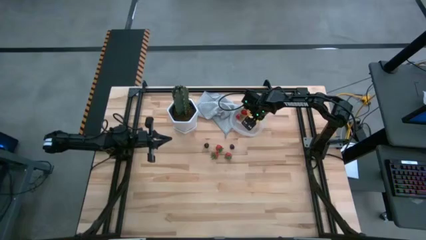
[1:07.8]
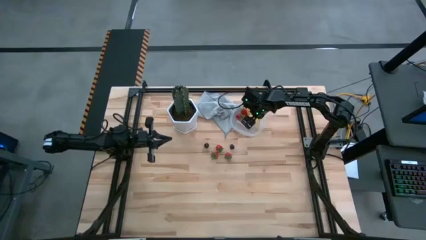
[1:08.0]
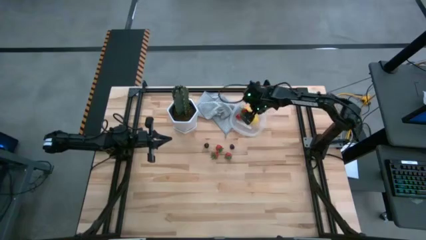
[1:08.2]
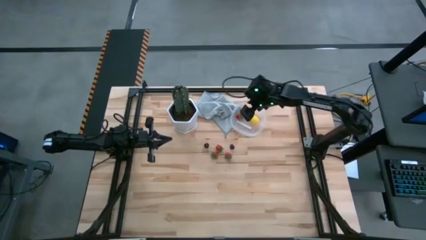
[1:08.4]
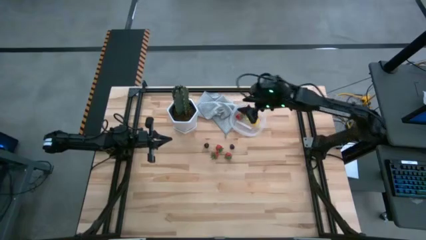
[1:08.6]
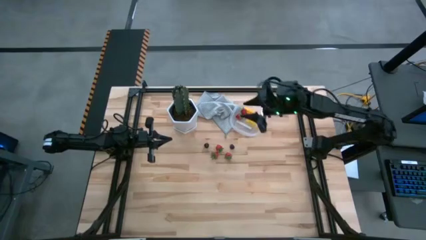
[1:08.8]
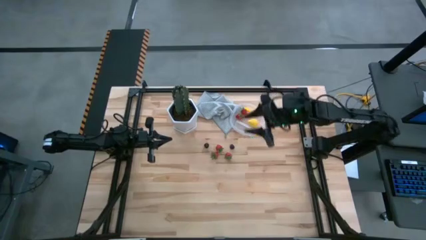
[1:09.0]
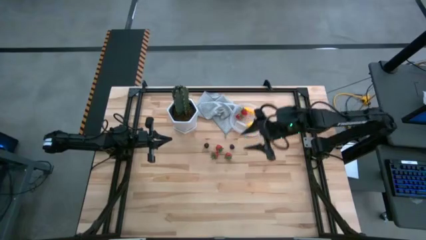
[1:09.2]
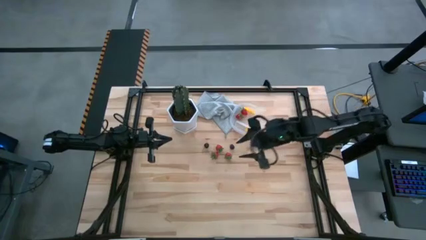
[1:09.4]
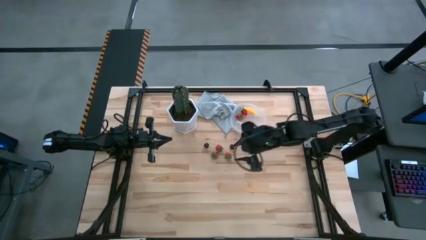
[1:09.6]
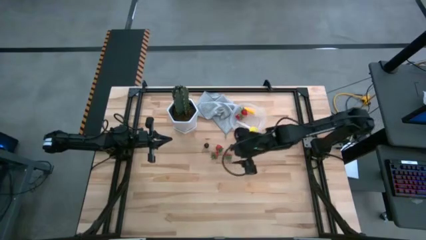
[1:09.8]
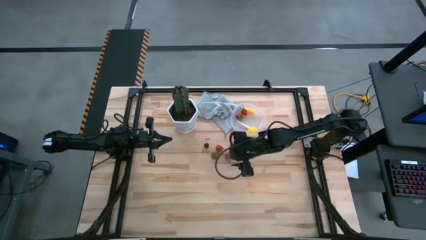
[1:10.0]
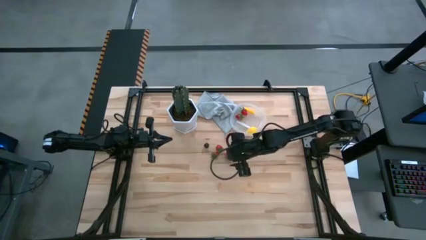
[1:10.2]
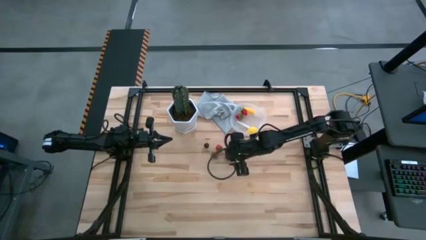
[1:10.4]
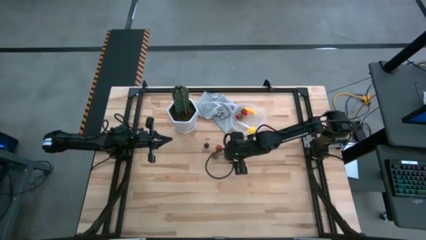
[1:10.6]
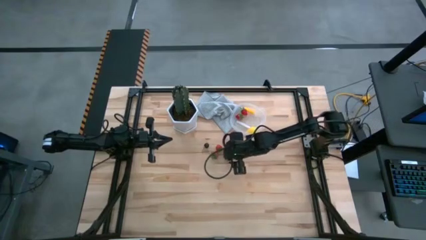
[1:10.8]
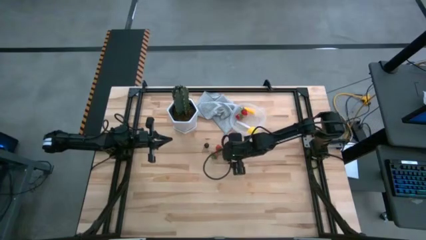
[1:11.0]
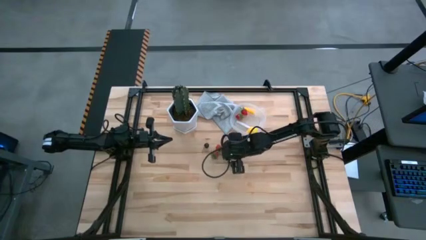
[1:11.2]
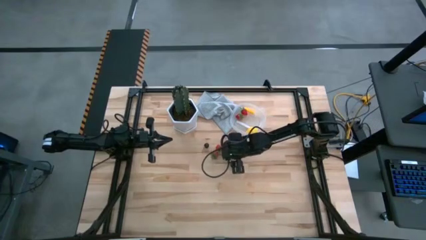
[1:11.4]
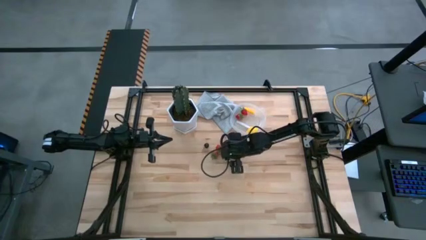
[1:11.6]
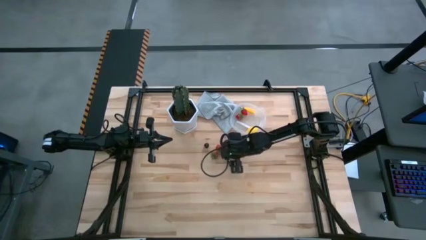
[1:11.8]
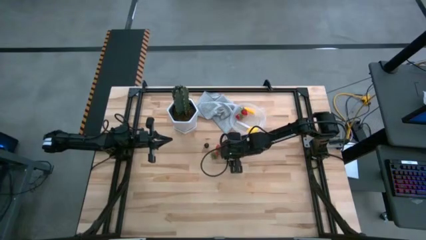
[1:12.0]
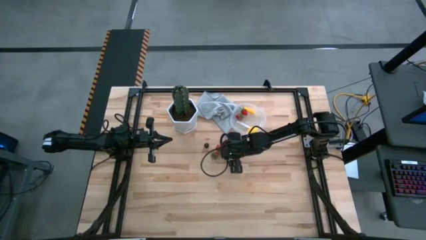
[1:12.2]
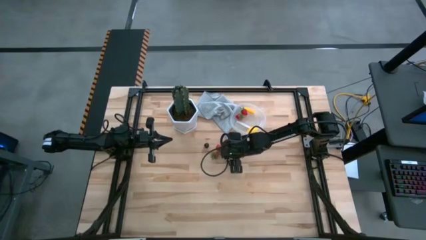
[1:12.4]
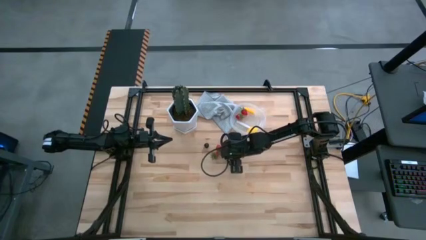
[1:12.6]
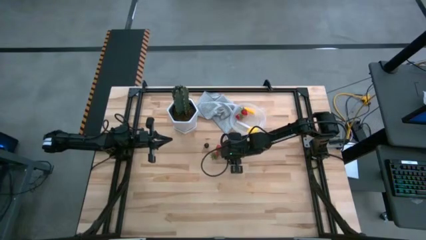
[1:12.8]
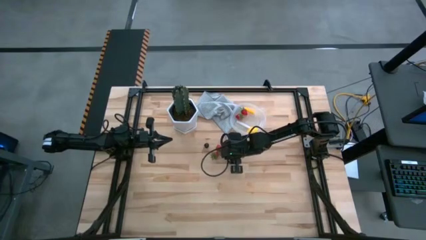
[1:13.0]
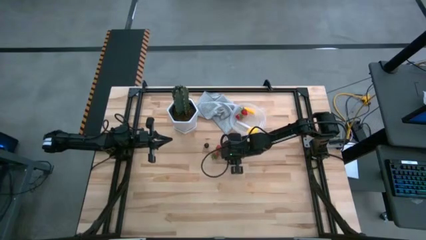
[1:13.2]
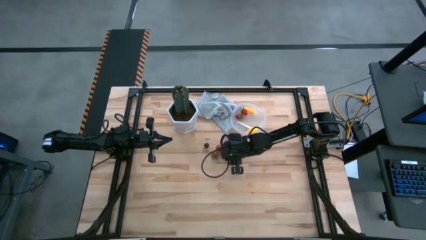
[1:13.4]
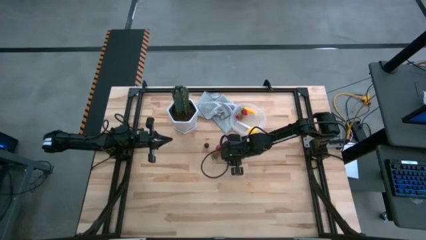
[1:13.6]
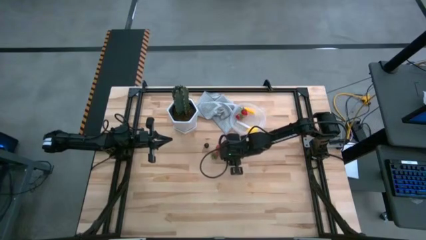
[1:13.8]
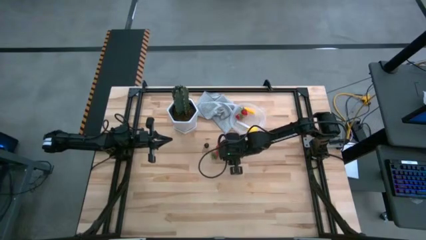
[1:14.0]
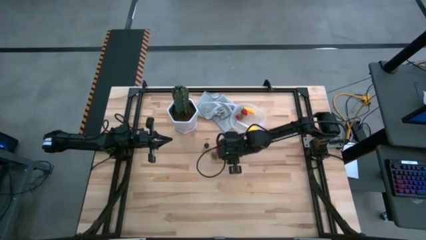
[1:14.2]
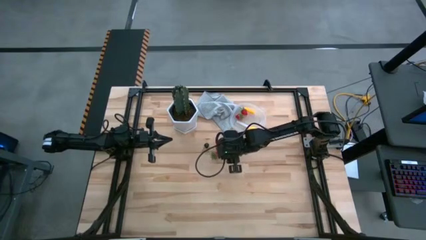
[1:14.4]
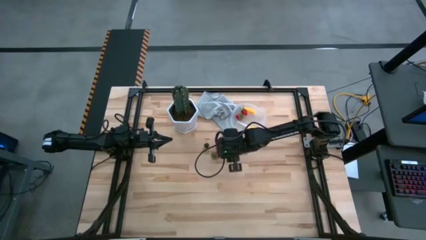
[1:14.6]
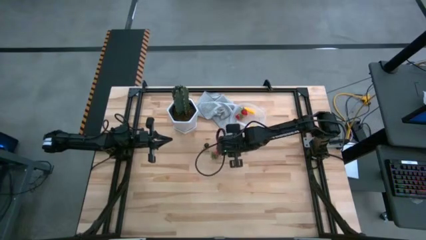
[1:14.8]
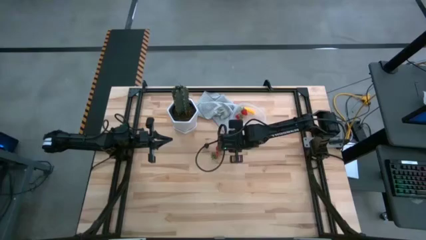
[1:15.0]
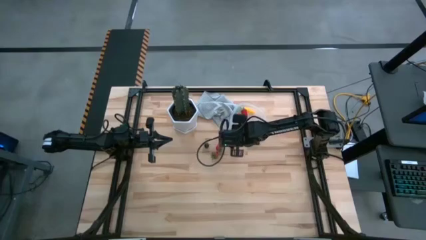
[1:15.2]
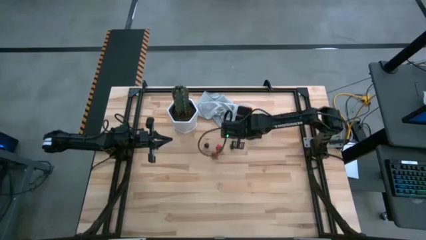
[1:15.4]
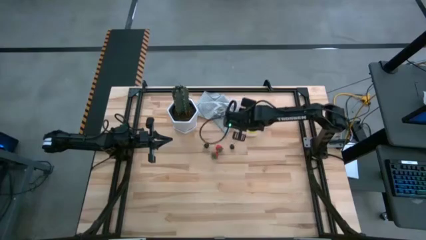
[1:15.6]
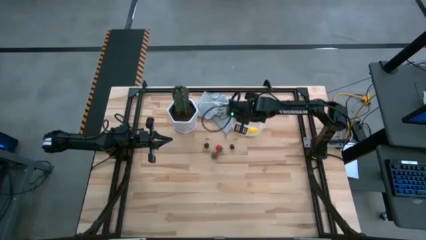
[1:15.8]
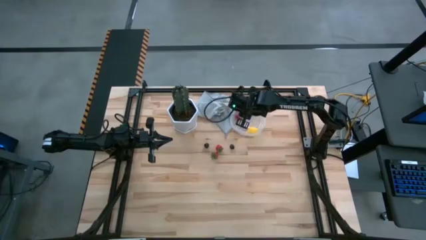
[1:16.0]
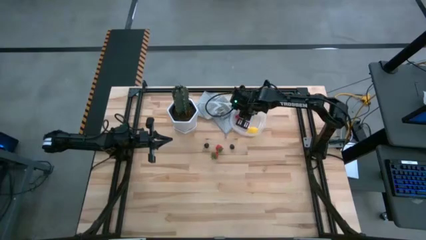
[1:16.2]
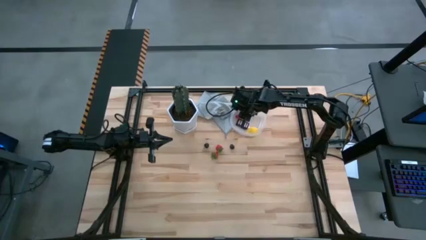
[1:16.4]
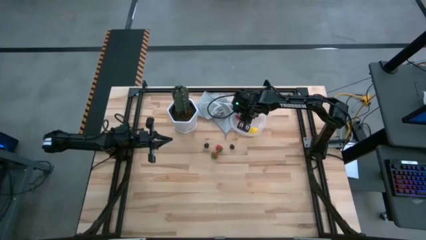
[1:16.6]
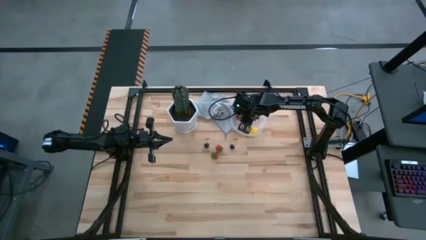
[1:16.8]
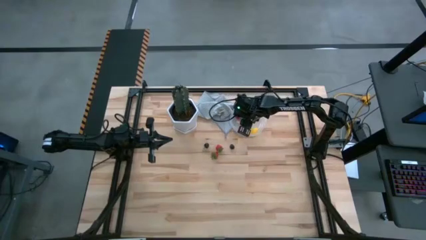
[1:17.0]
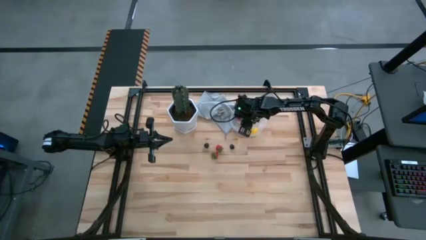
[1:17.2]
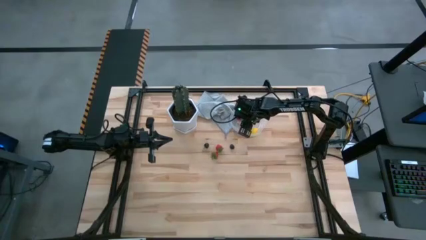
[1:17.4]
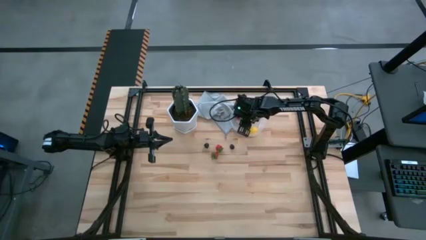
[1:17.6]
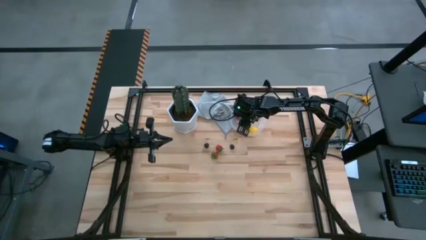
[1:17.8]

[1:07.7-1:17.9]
Task: Pick and placing Produce into tupperware
Put the right strawberry into the transparent bin

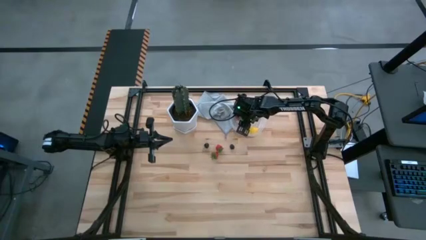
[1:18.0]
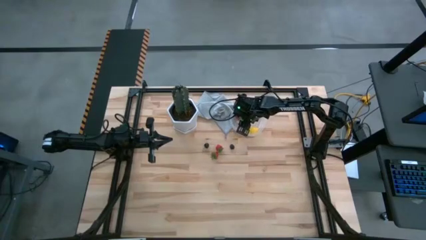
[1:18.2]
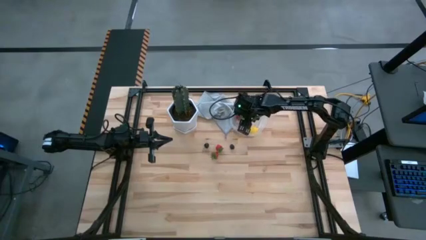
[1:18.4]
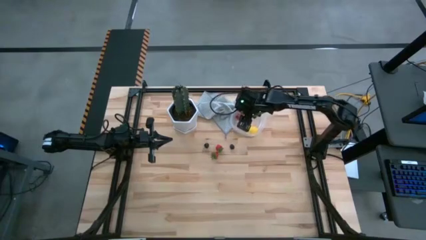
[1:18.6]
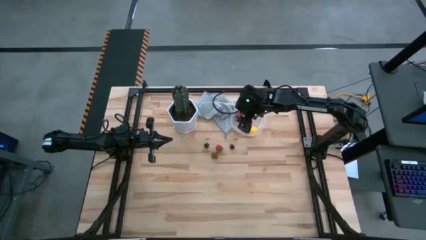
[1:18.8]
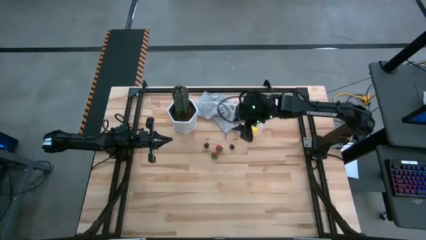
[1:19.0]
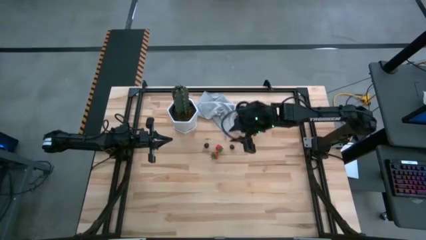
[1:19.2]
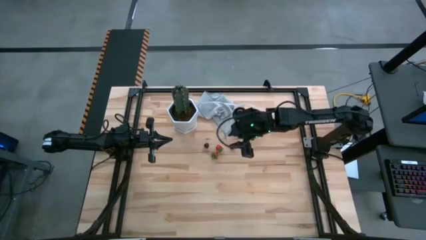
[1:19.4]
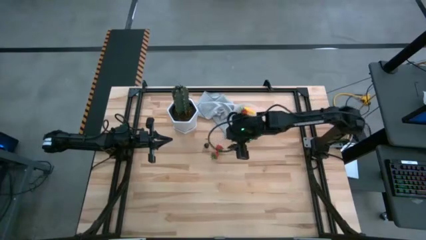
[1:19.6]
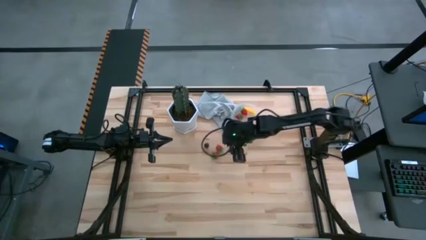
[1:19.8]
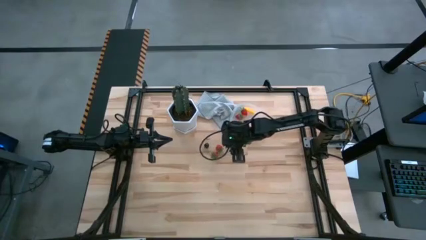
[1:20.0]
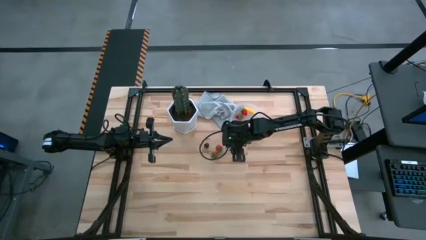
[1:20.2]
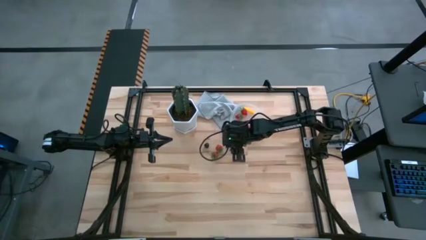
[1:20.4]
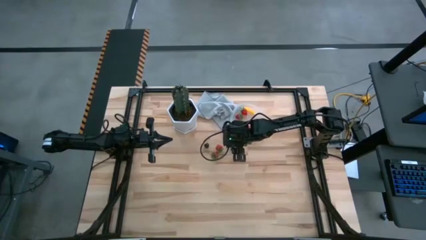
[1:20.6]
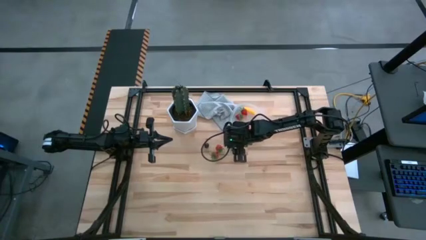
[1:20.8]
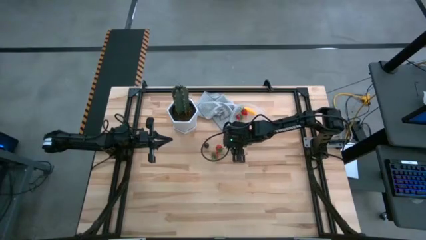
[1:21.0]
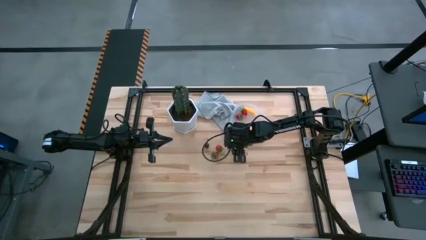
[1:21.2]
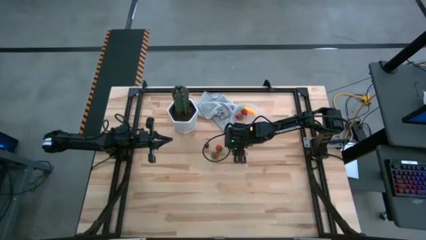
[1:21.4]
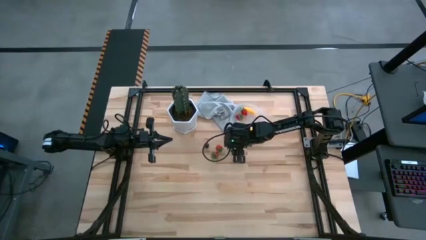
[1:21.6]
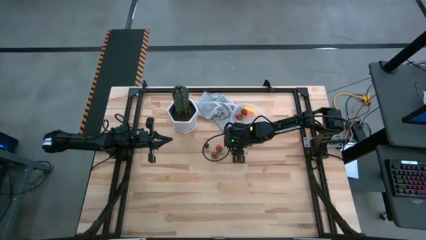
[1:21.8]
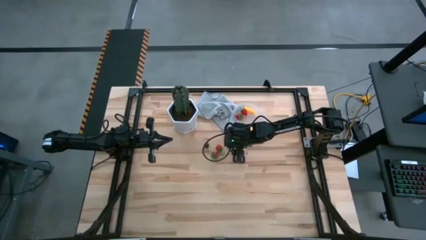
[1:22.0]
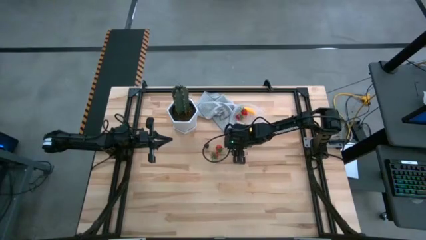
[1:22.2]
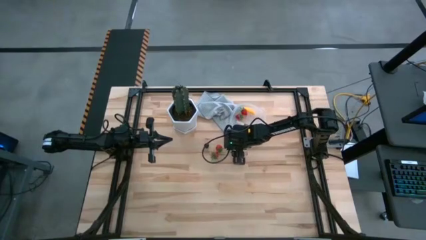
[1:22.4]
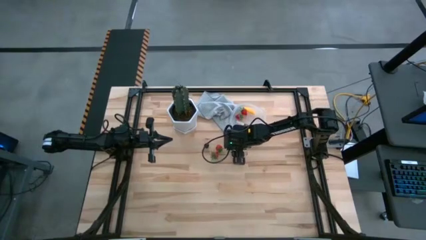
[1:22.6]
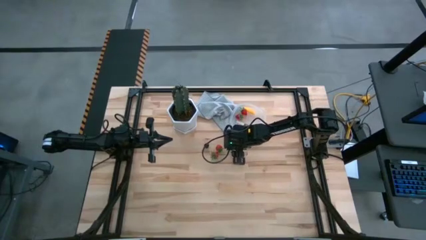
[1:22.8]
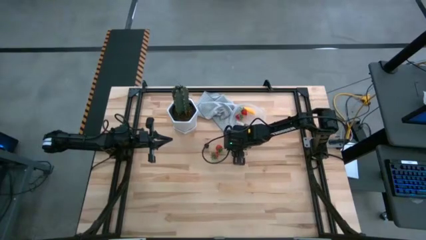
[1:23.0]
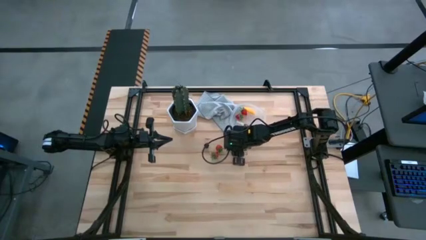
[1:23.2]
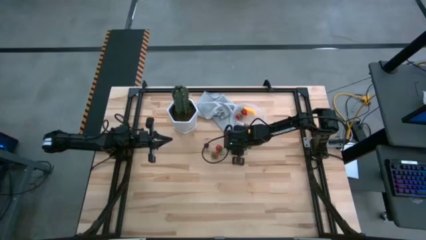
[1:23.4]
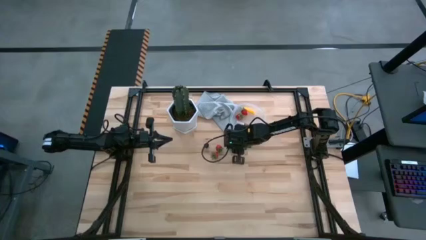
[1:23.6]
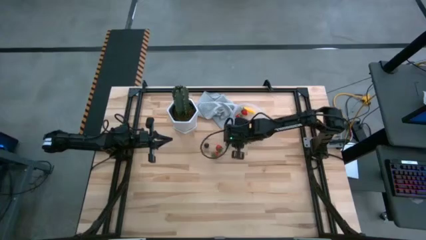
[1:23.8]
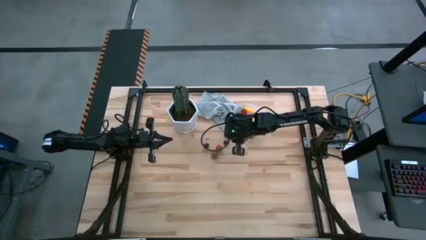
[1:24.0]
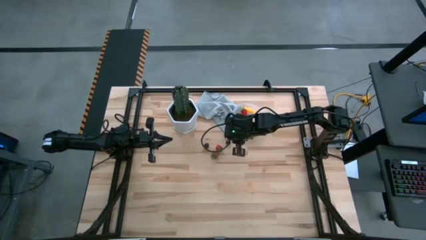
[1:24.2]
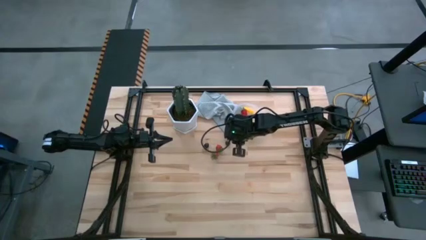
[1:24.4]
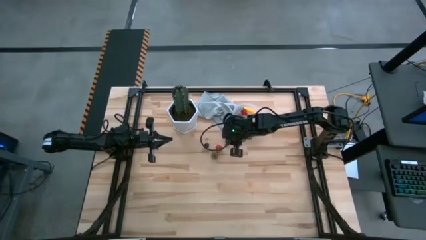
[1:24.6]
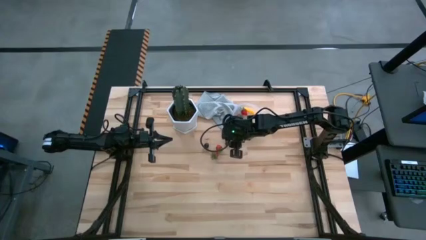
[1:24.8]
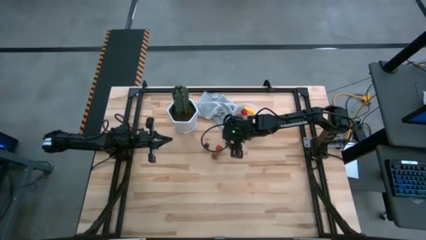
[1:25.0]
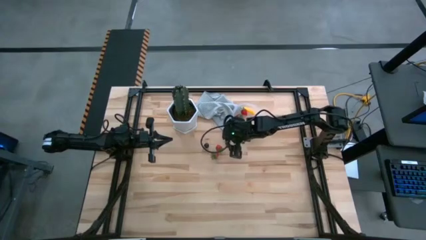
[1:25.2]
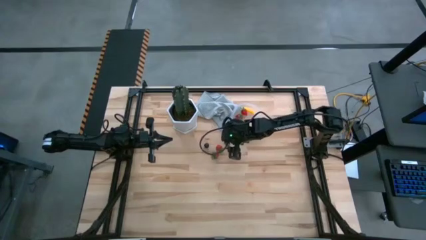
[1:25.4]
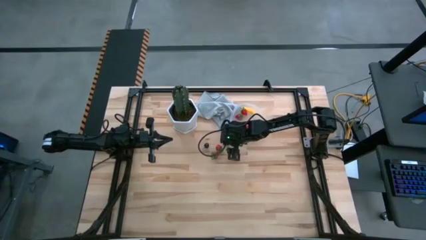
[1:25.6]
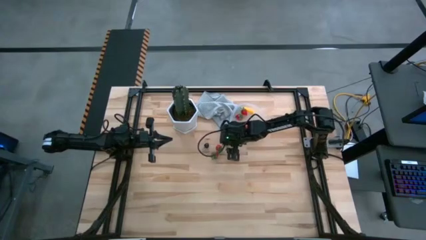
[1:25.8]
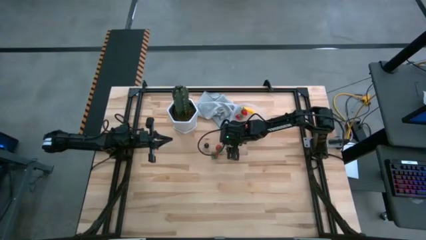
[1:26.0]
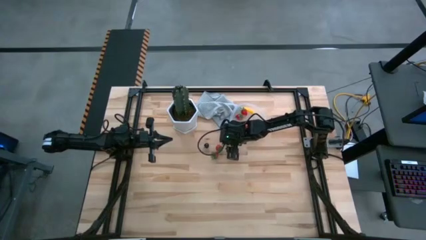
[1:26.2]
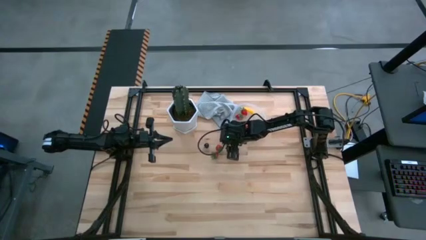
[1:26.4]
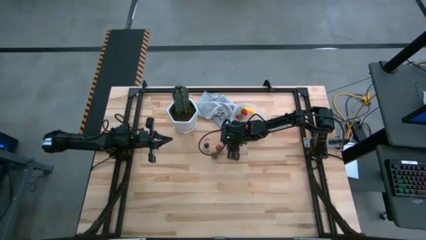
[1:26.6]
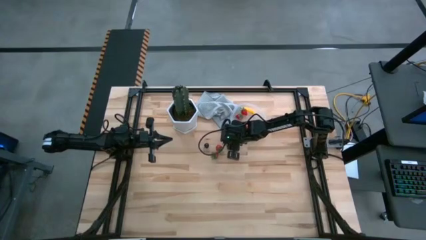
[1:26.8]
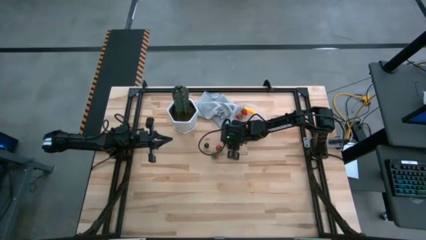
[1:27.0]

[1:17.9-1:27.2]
Put the blackberry into the transparent bin
